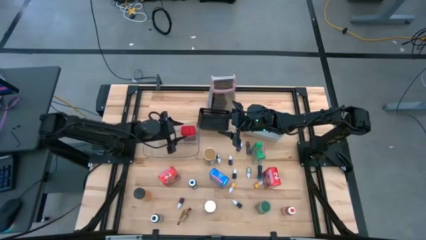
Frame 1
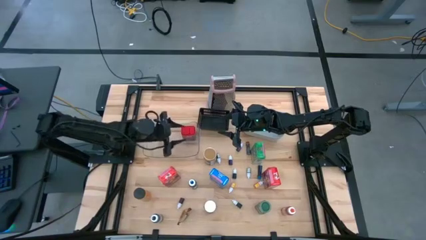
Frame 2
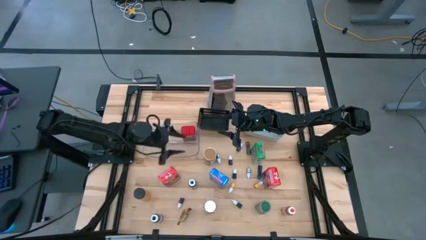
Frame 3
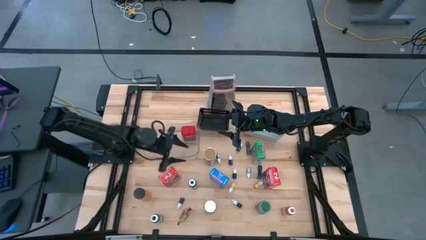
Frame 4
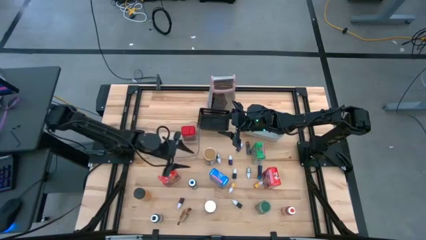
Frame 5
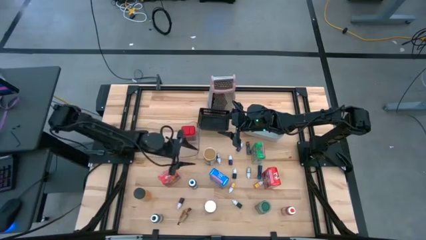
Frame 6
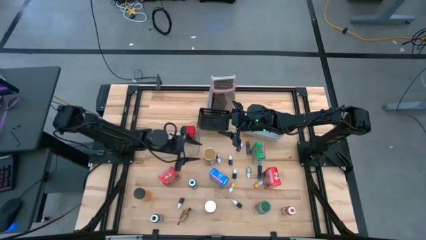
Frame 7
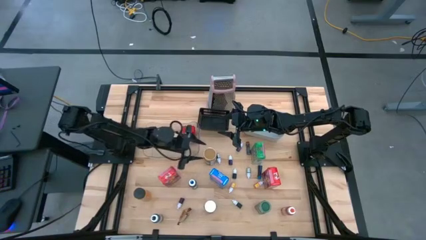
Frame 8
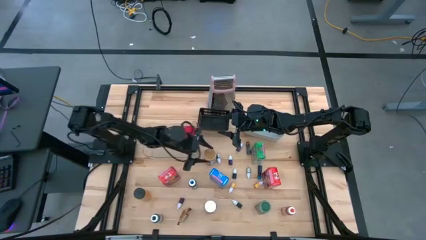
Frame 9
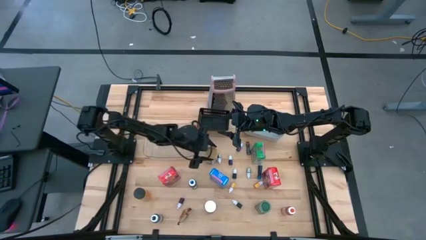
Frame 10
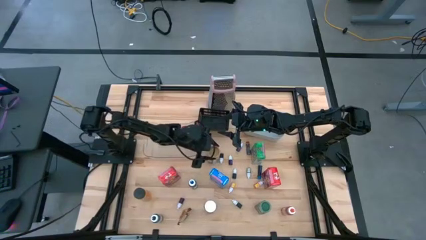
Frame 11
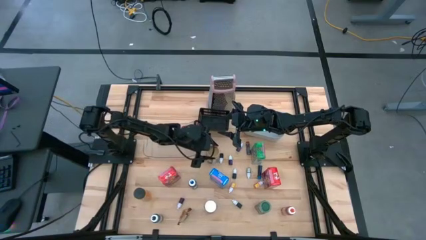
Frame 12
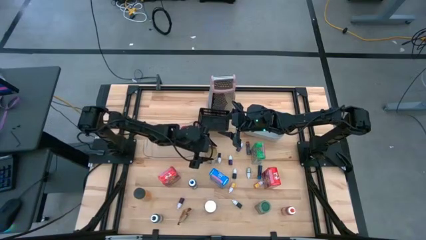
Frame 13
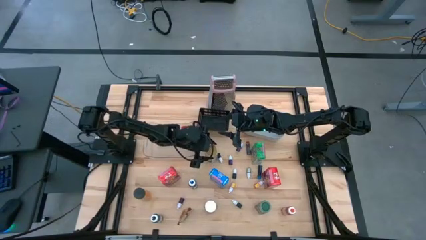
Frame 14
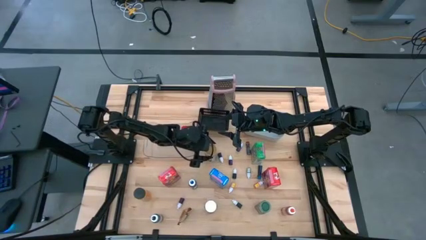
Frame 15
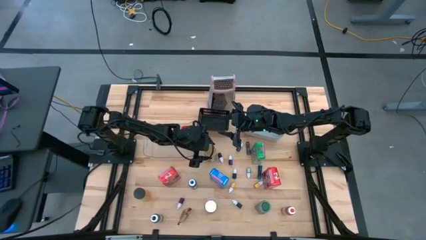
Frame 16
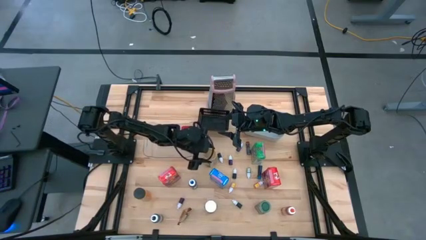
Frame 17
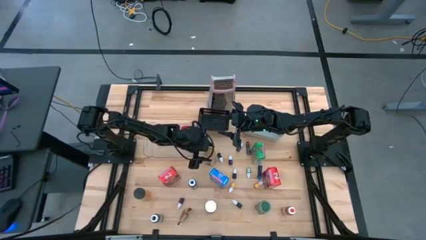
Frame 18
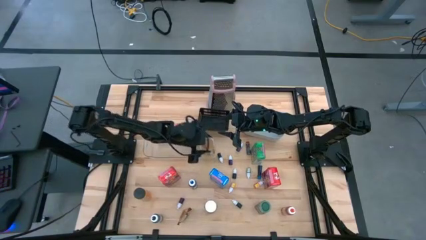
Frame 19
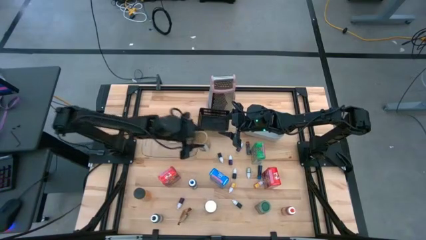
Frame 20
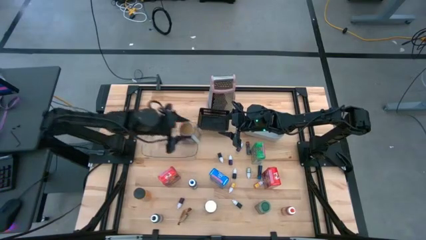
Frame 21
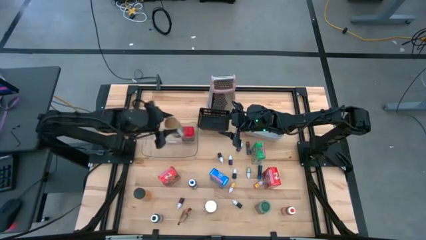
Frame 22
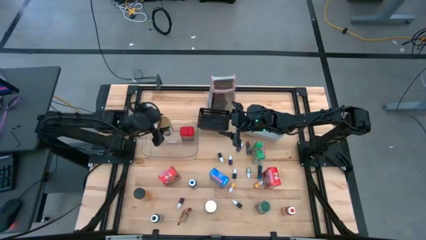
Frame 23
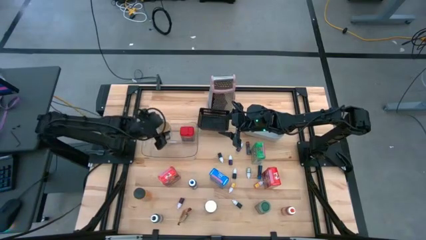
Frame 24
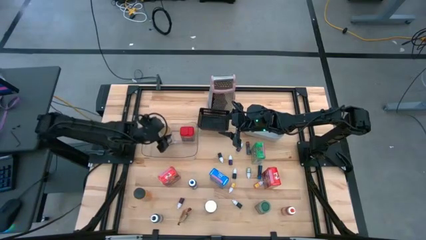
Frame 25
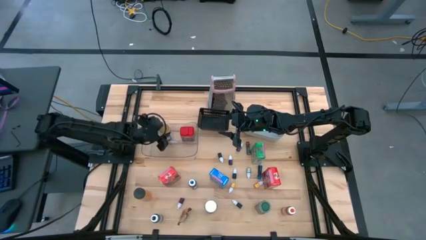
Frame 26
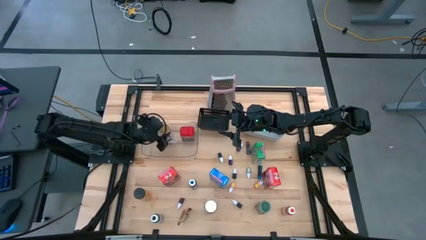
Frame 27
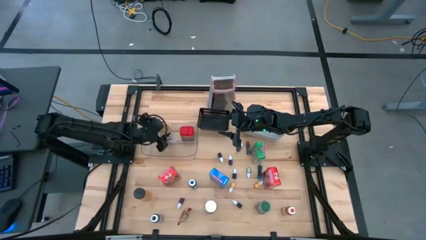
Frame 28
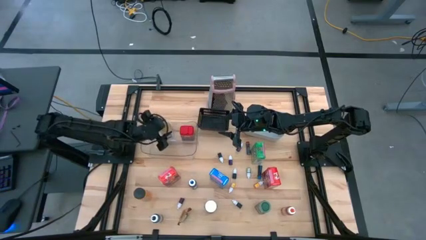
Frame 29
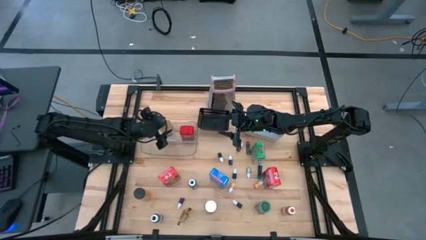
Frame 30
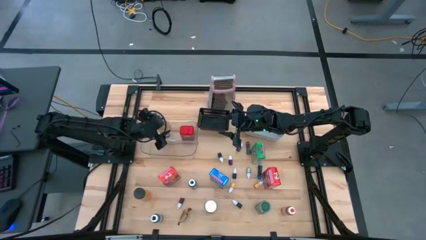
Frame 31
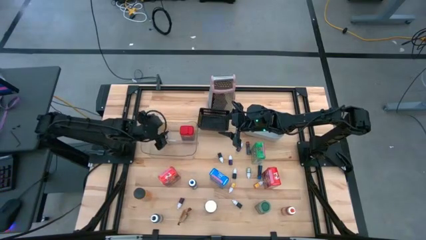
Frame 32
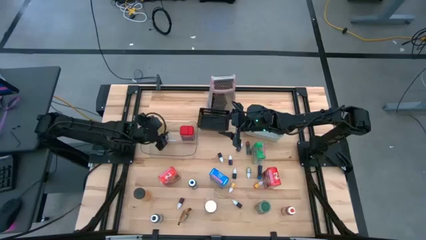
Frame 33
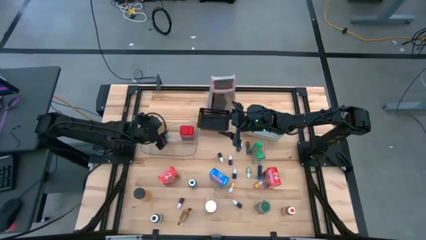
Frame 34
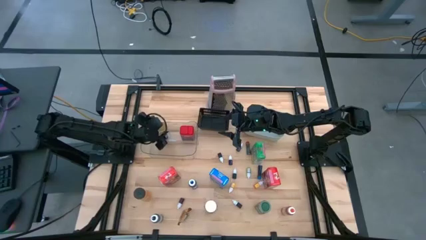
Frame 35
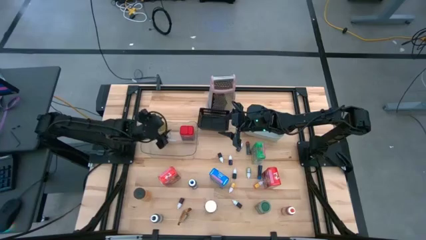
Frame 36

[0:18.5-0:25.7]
Task: Pick & Place Kitchen Items
Put the gold seasoning bottle into the transparent bin

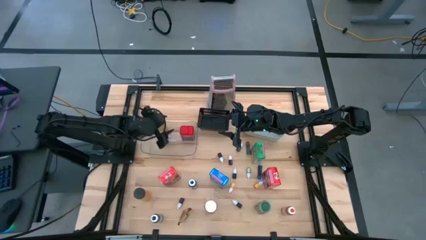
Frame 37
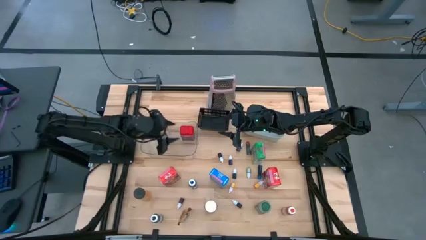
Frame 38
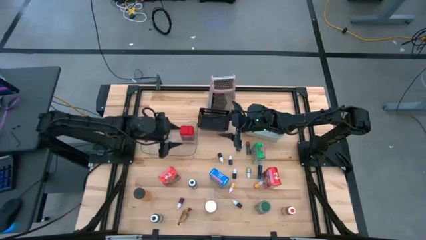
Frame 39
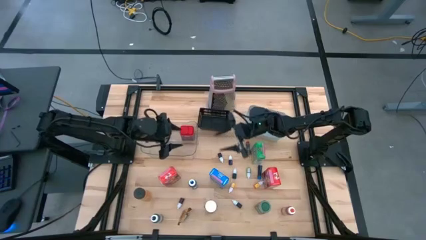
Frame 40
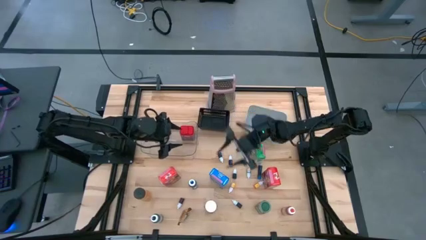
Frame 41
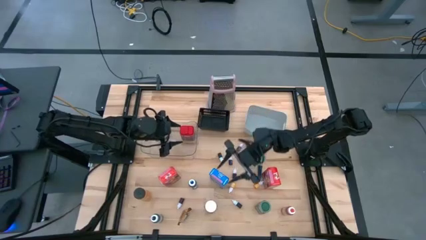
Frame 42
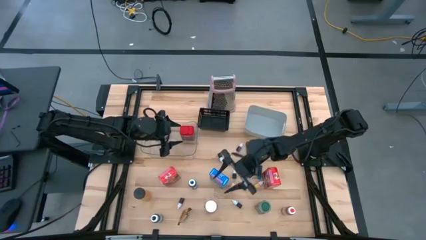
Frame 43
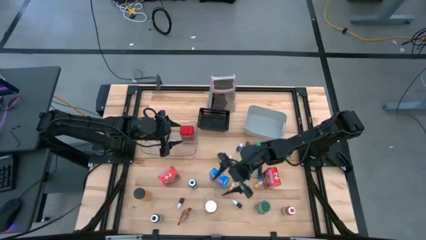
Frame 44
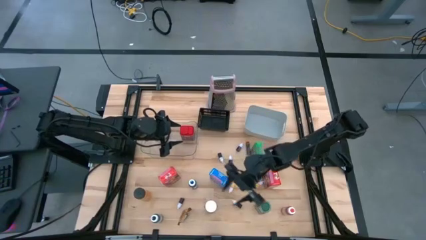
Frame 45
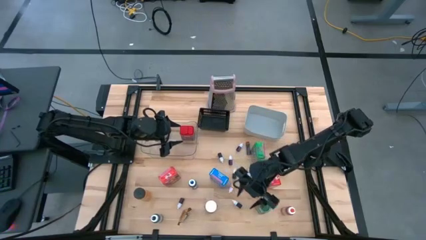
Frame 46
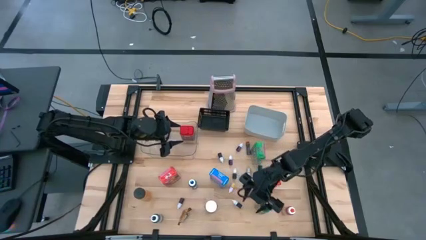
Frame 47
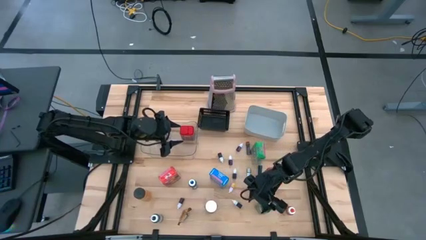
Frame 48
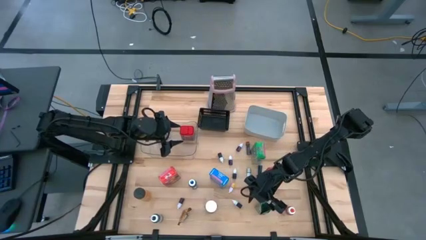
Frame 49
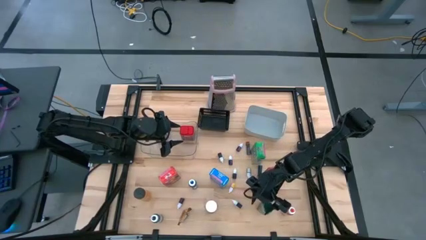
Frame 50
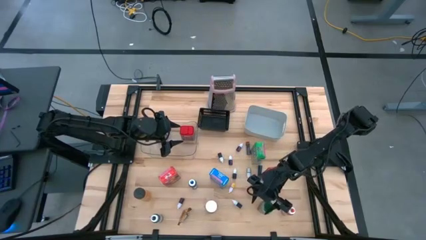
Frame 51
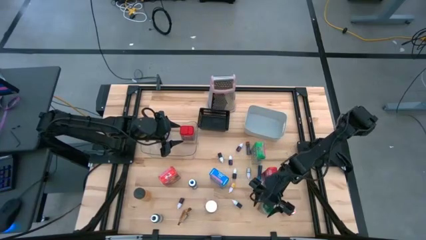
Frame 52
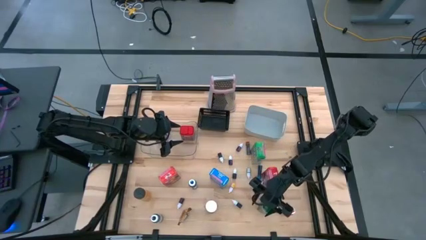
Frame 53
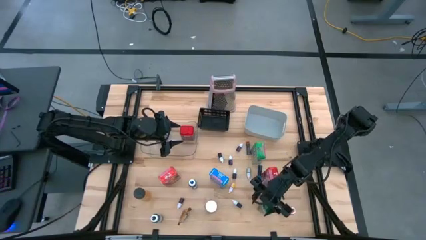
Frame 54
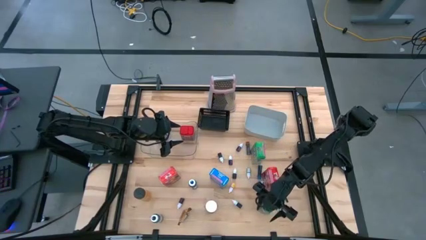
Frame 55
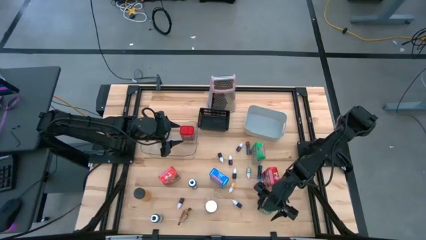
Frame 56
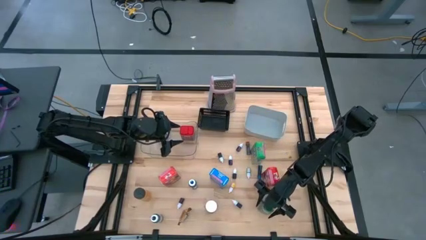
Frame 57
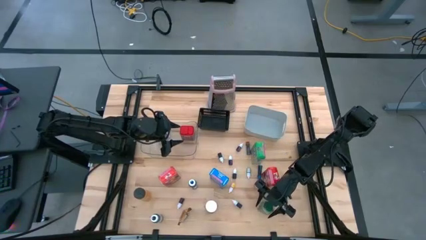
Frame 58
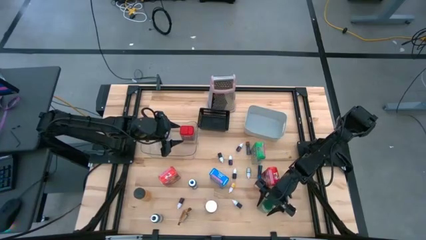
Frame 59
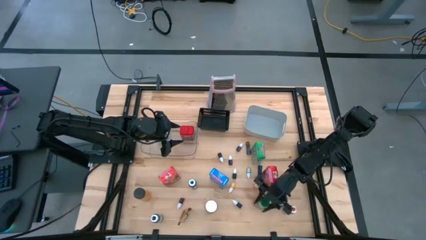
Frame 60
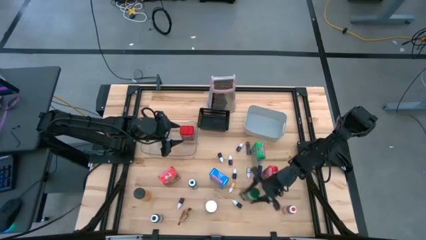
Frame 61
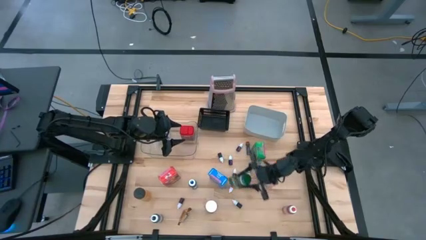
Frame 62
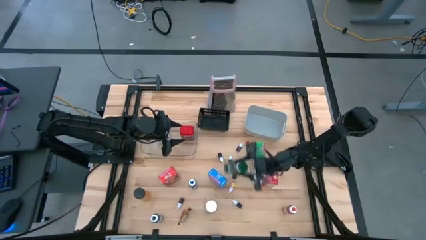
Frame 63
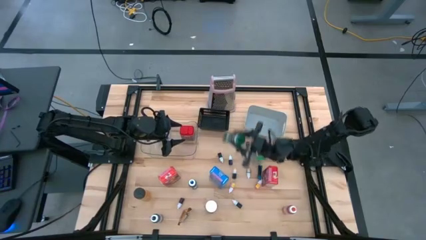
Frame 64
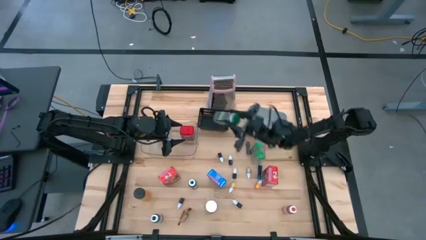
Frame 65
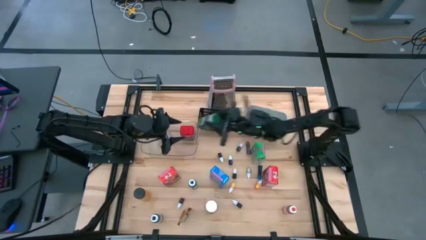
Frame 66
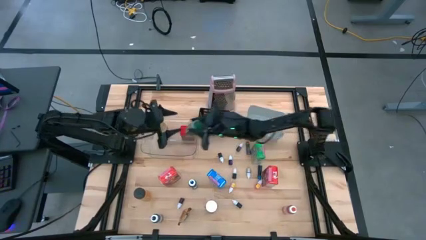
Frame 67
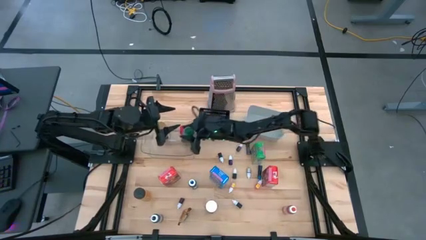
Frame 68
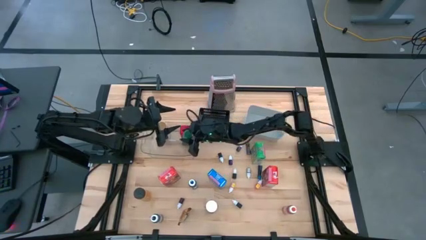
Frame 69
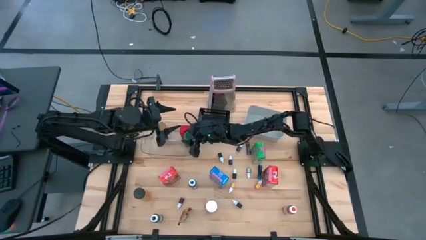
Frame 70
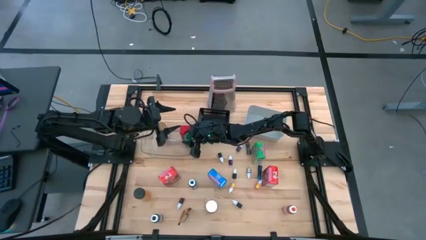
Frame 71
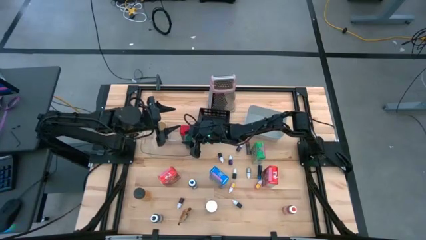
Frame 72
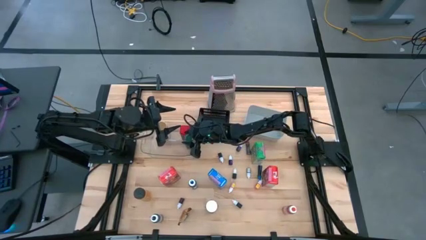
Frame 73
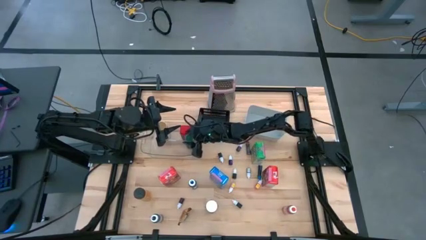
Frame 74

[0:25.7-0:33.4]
Put the green seasoning bottle into the transparent bin

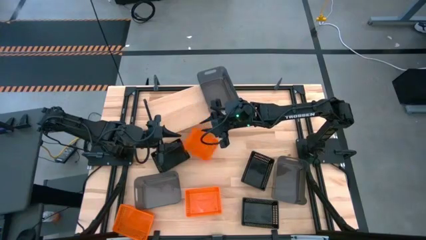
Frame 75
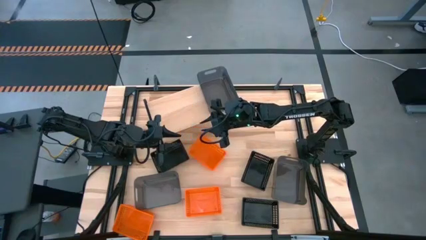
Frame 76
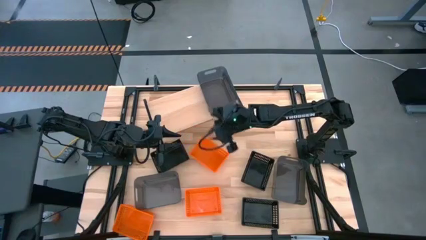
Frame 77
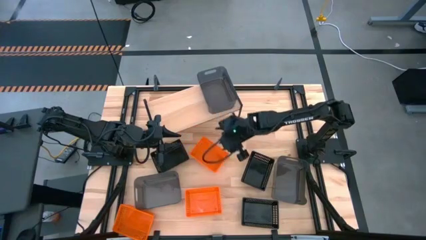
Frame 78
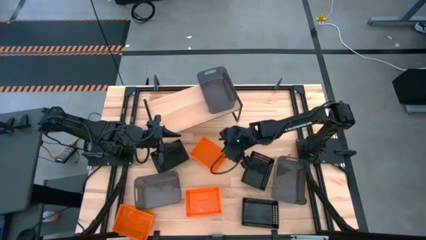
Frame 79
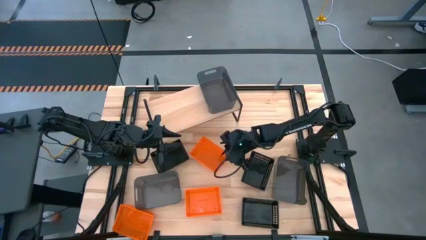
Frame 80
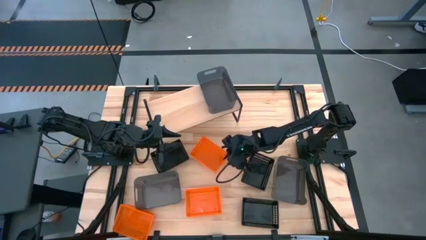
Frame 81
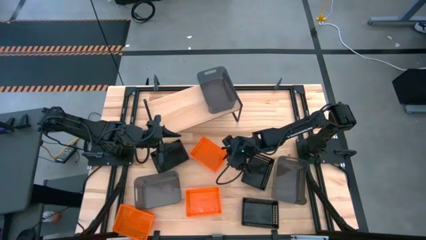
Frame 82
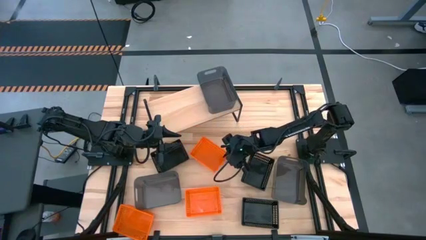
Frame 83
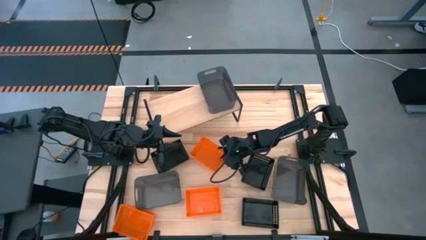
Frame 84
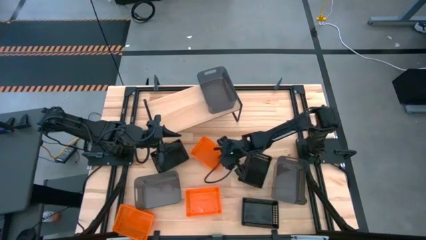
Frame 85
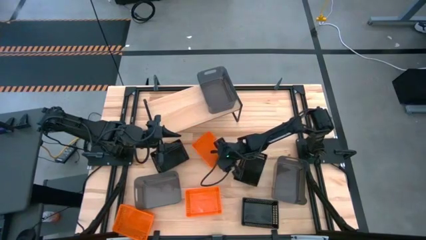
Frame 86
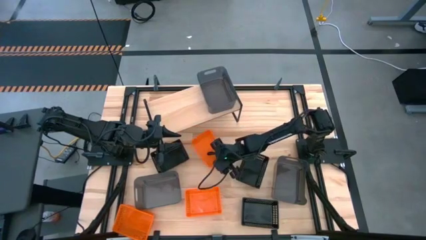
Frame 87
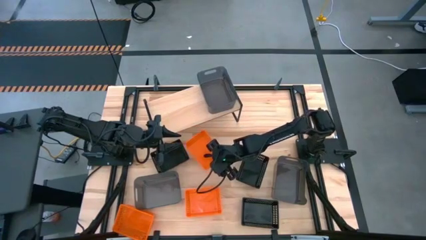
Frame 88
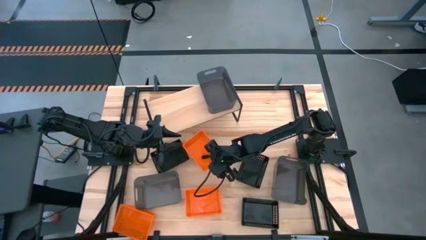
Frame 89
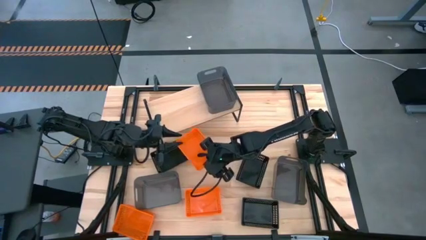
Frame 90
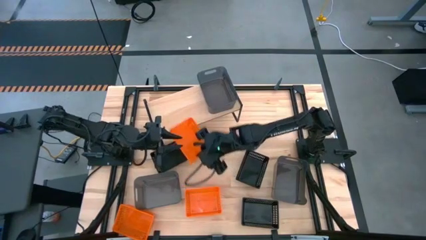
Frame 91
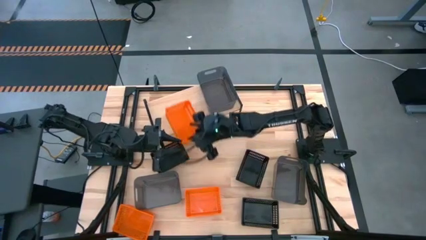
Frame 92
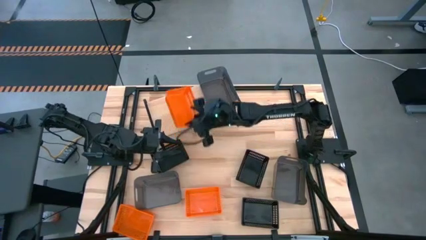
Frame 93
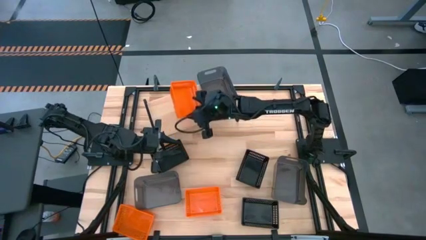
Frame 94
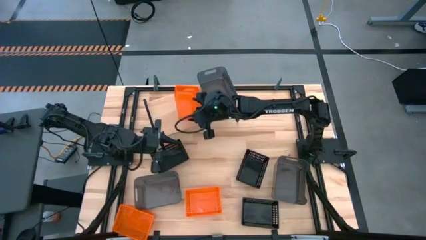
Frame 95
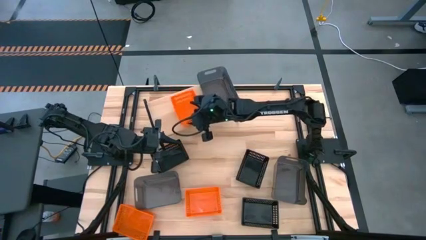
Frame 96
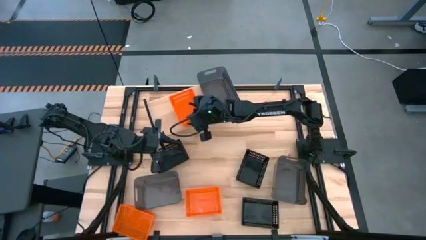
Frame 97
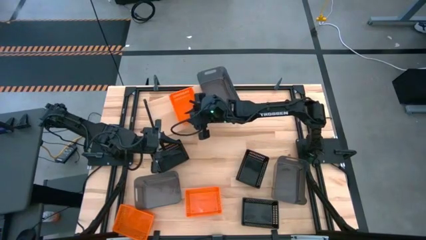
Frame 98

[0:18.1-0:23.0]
Task: Stack baskets on shelf by color
Put the top right orange bin on the shelf
